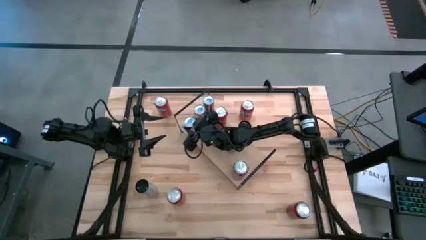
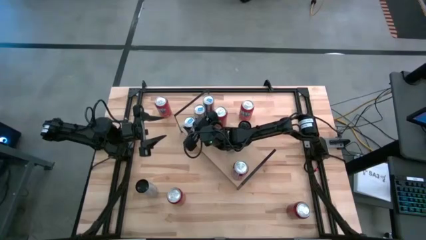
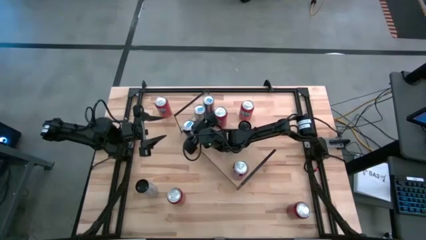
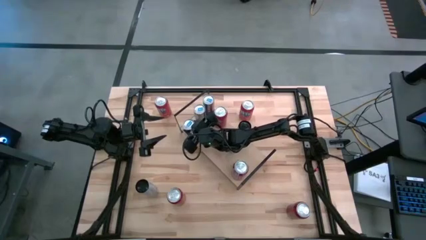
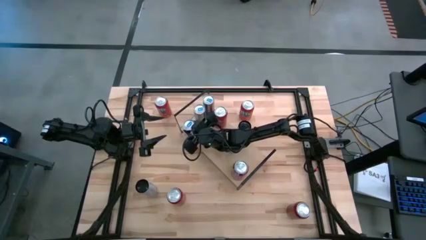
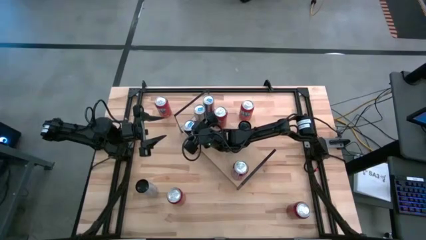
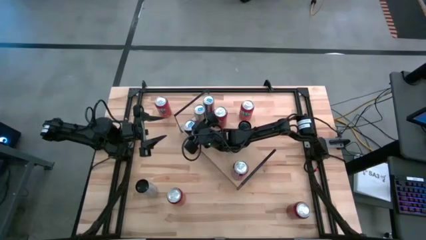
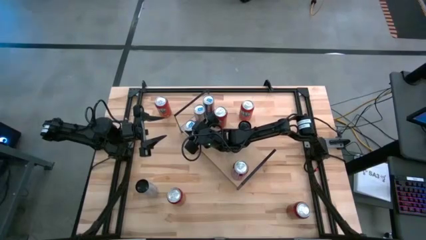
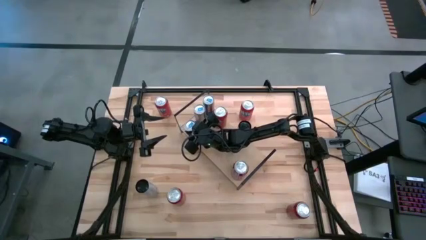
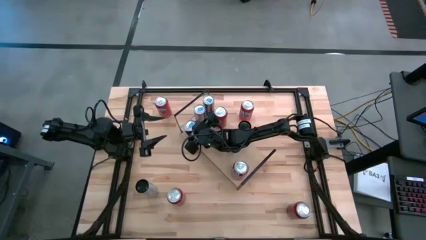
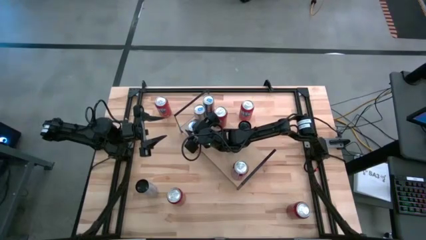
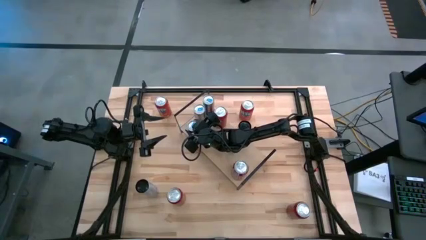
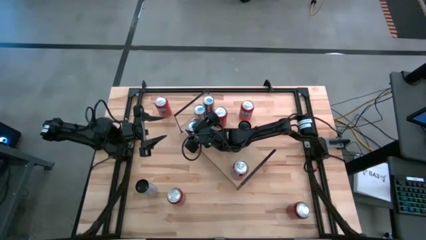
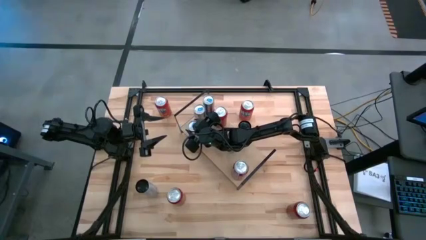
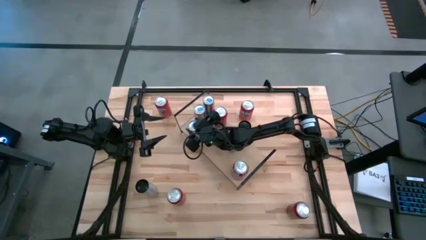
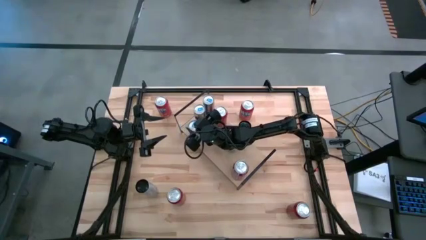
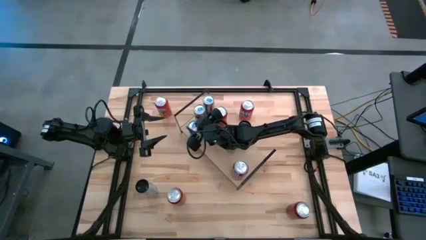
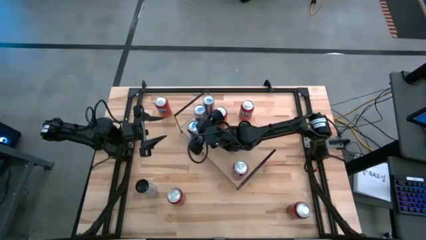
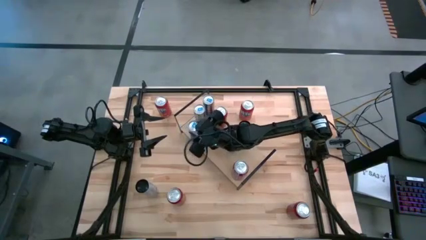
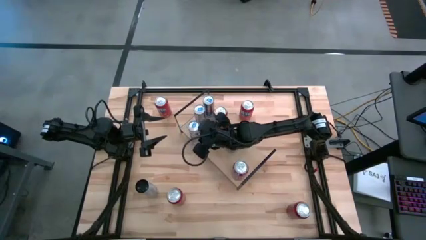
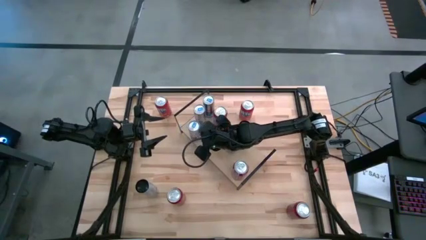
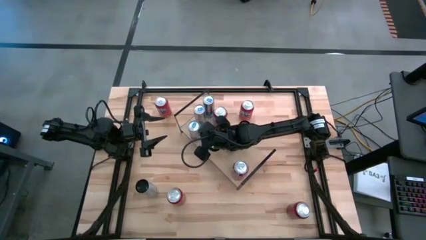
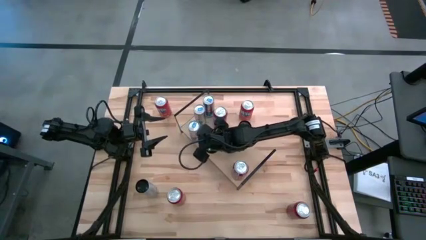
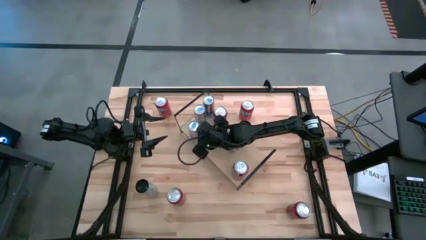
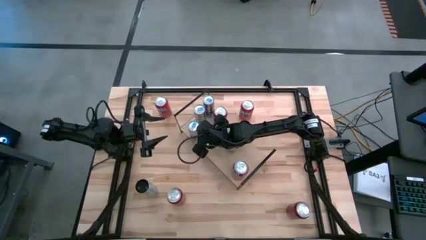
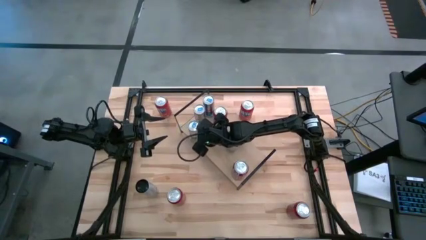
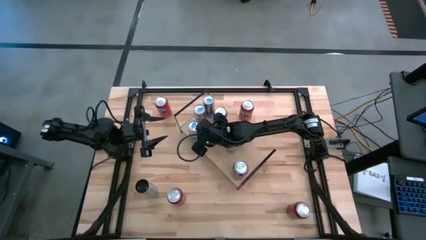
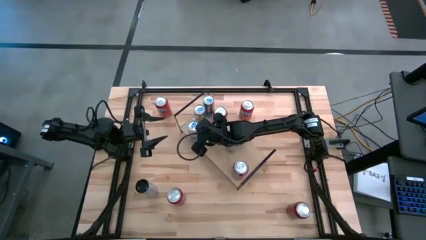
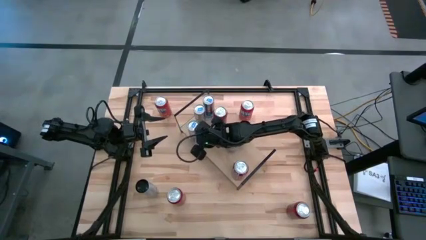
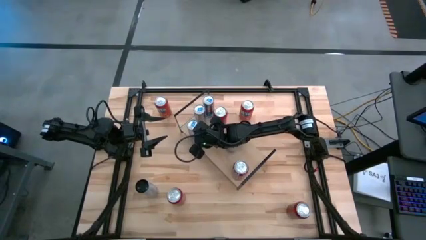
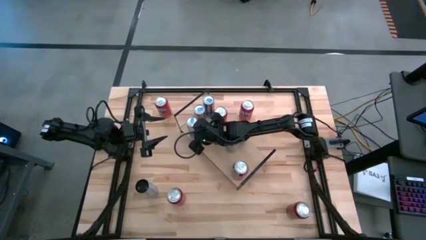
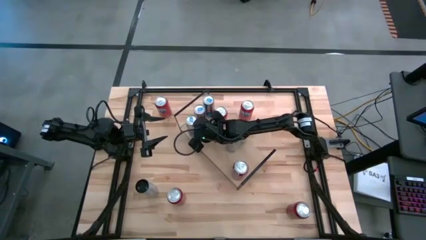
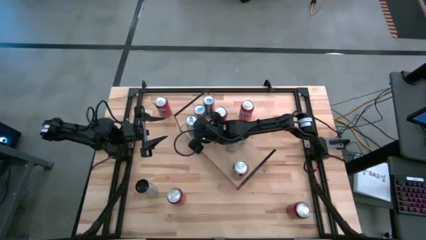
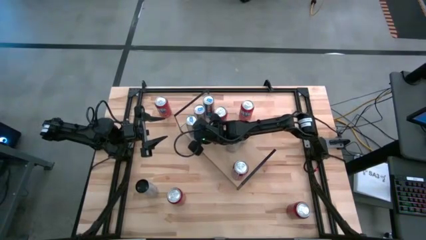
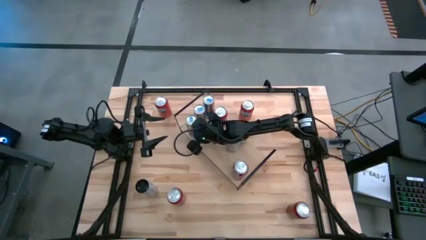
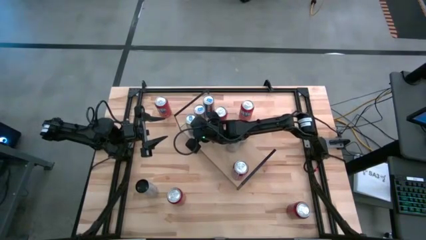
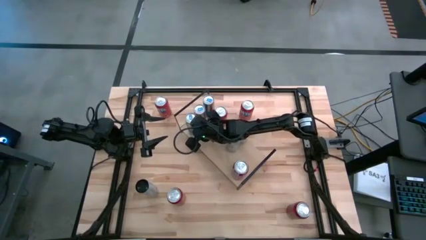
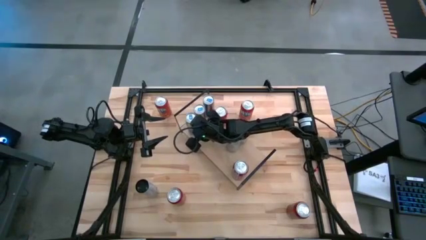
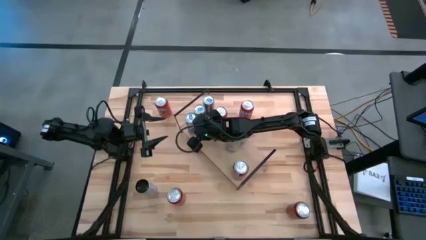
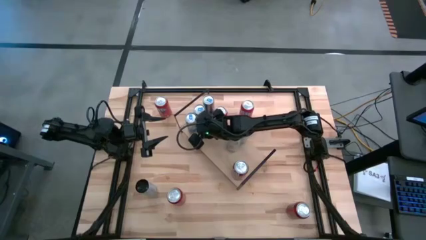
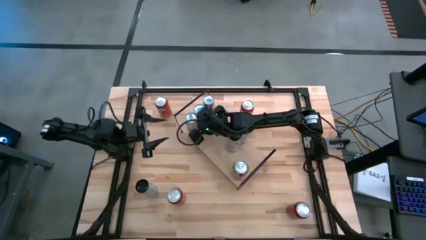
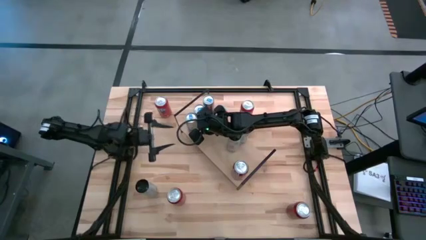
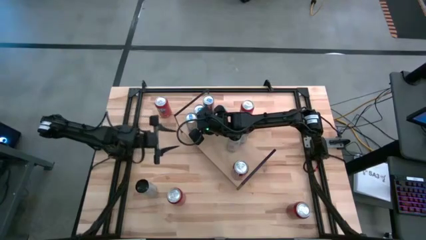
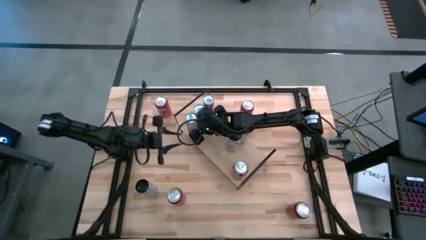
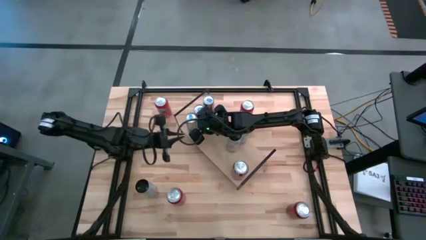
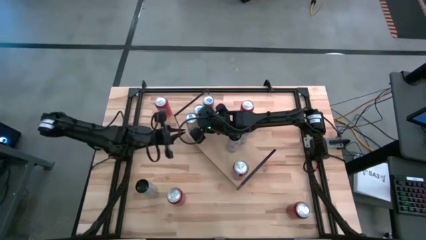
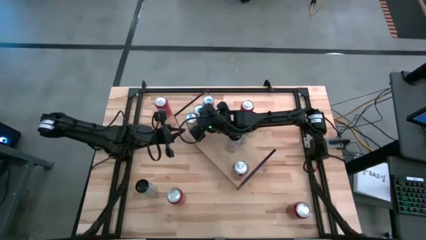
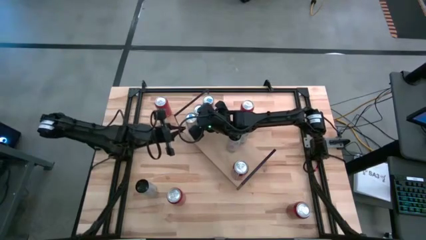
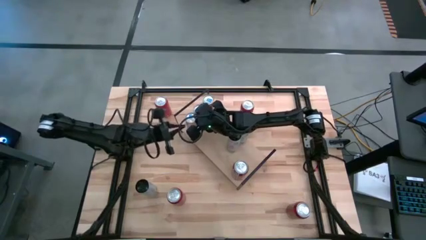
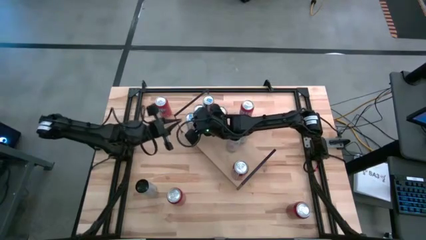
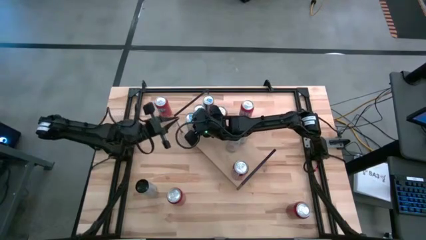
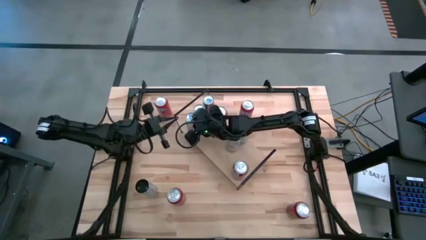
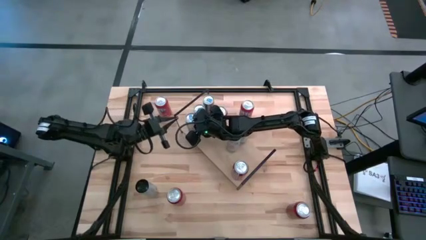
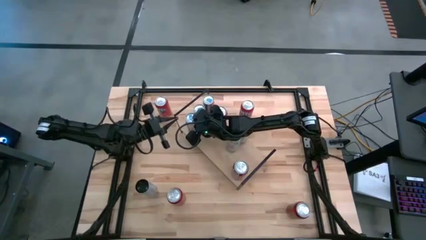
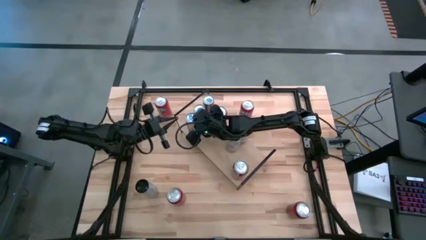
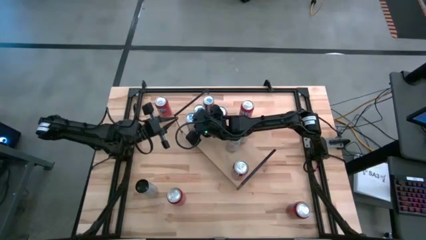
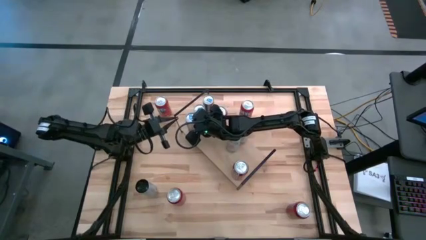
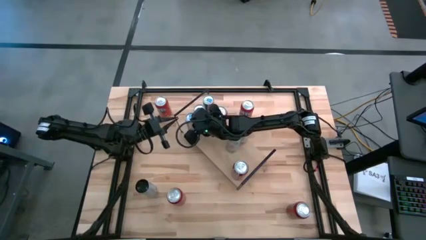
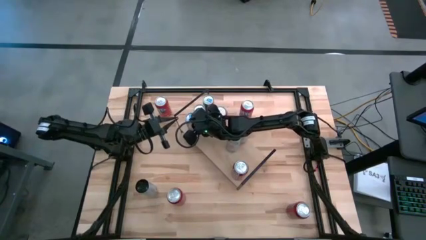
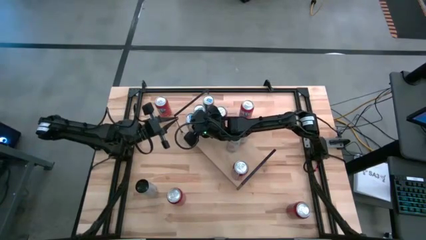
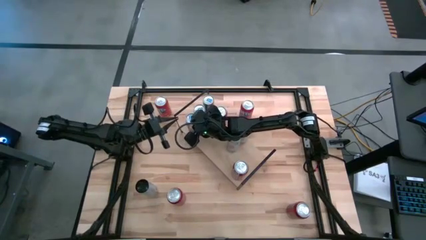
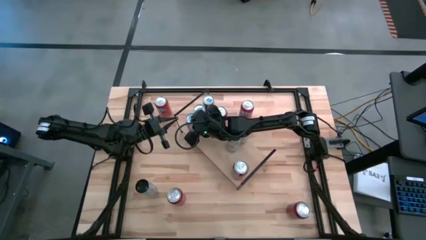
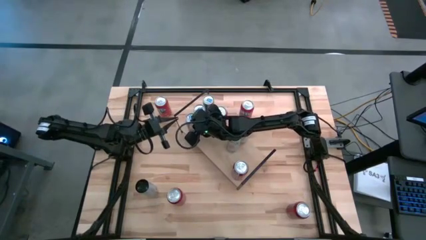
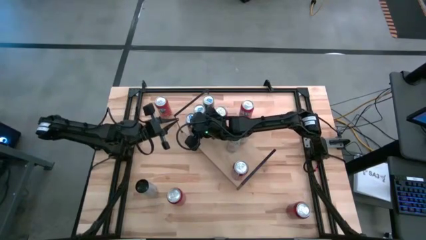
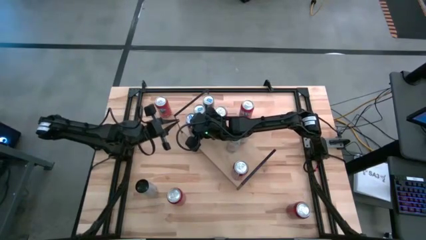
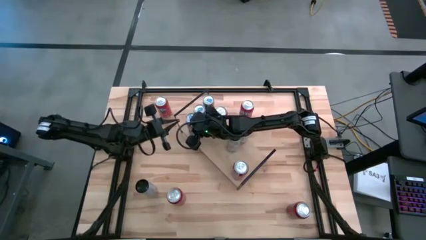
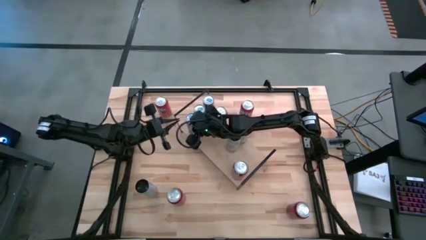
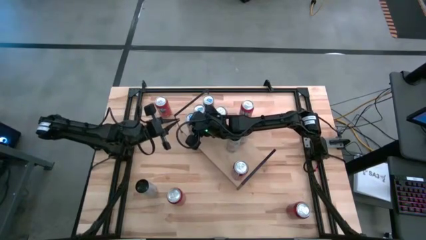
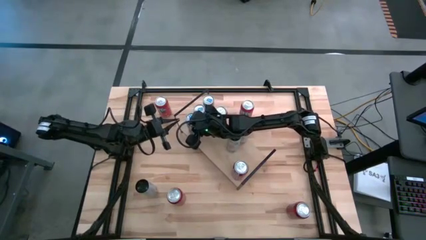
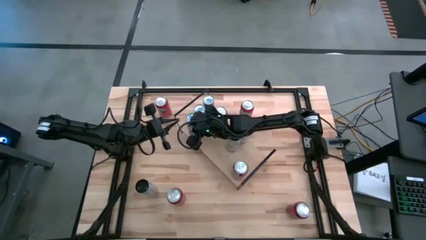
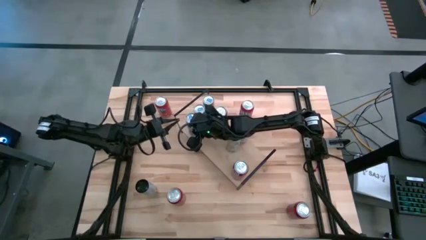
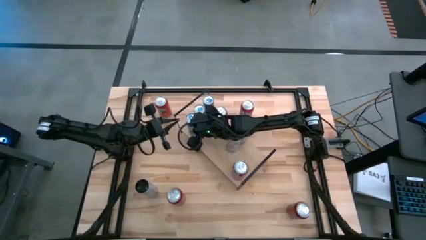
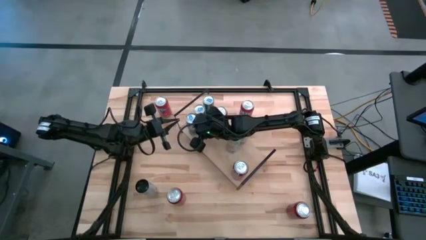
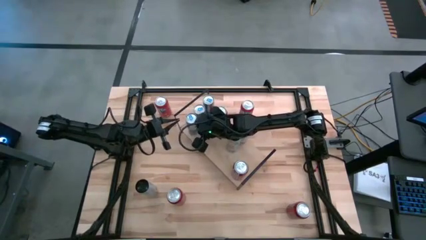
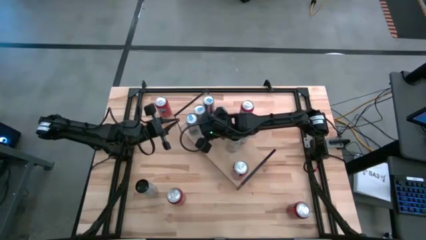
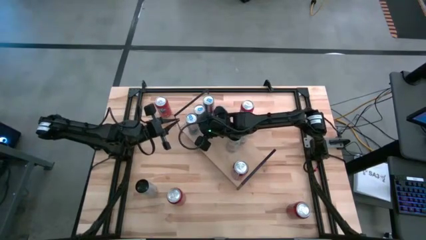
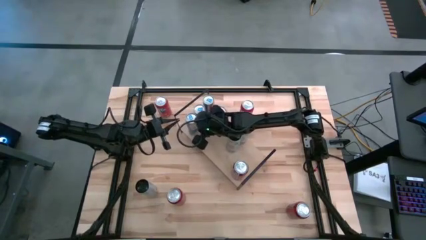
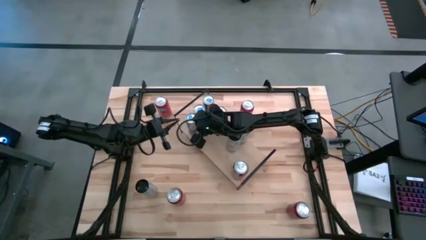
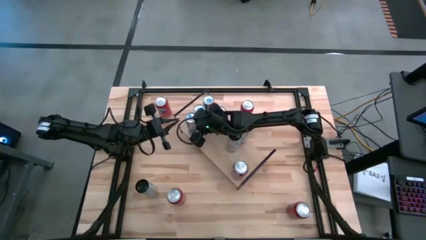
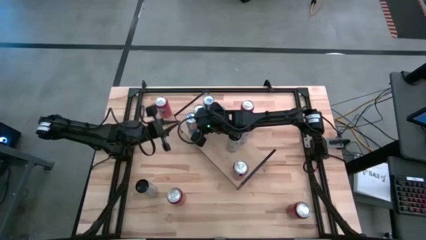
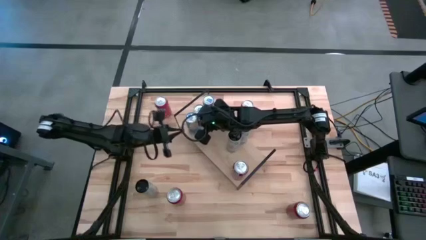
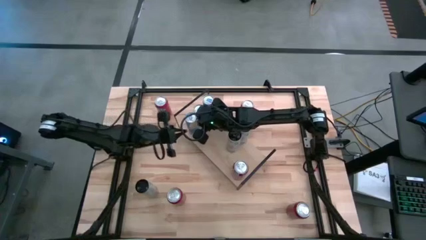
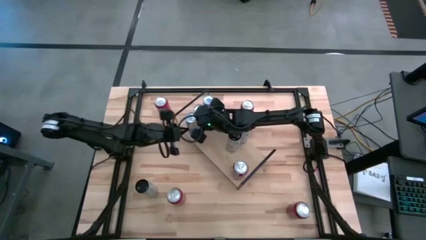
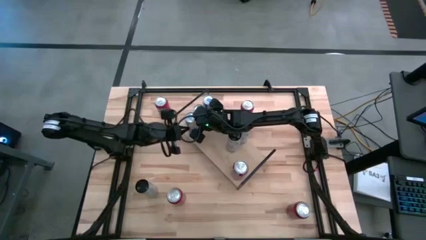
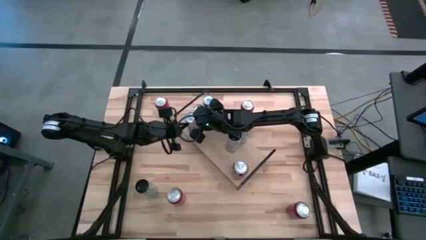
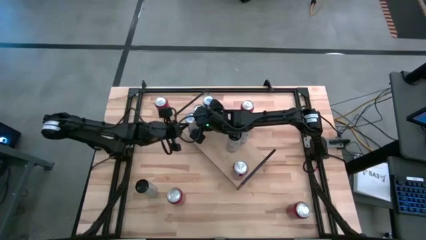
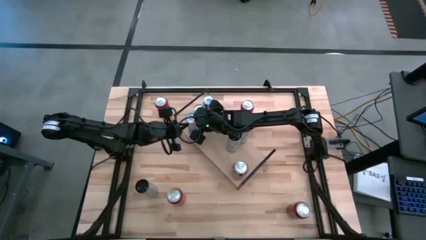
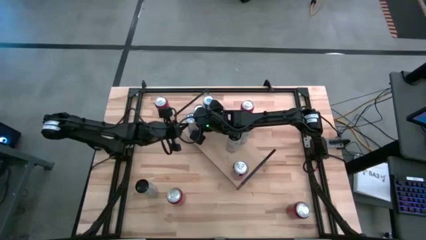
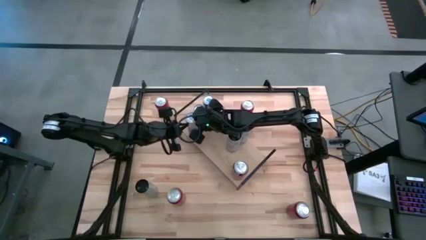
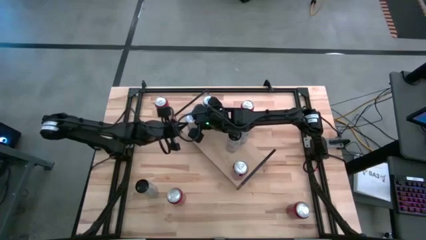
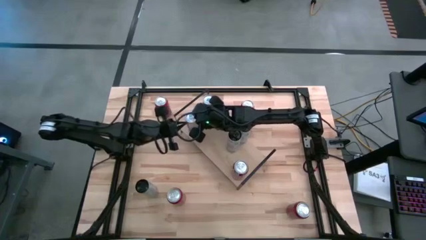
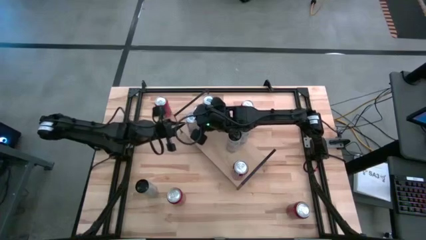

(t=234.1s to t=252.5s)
Task: Place canned beverage on shelf
Put the blue soda can on the shelf aligned with the blue can on the shelf
